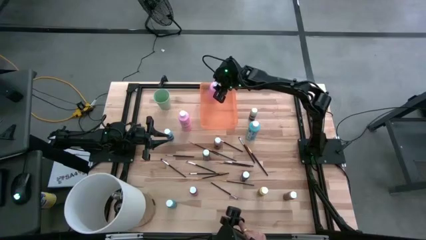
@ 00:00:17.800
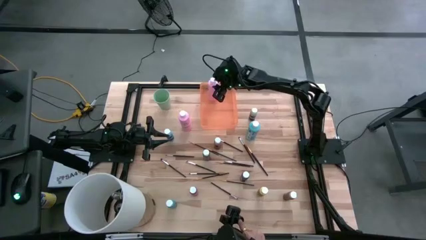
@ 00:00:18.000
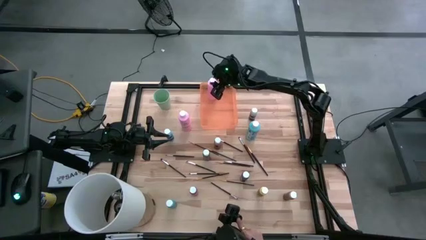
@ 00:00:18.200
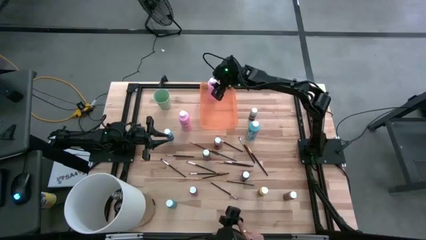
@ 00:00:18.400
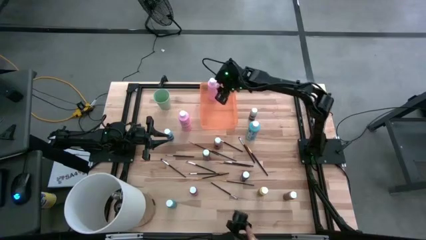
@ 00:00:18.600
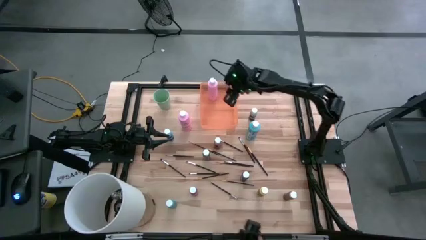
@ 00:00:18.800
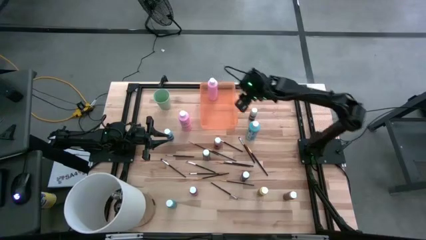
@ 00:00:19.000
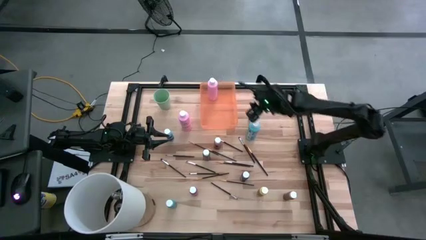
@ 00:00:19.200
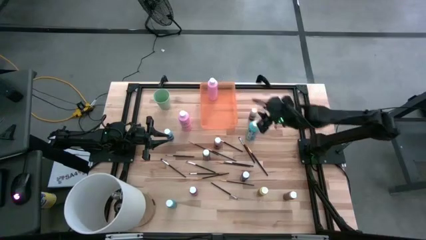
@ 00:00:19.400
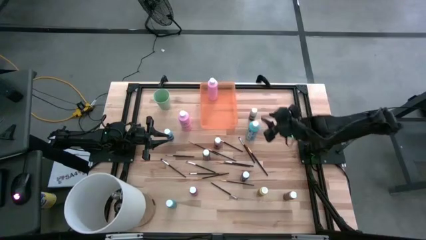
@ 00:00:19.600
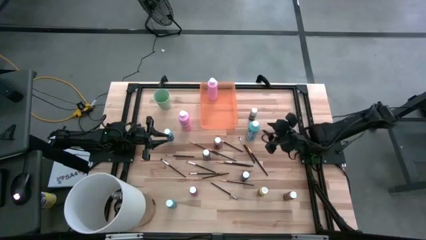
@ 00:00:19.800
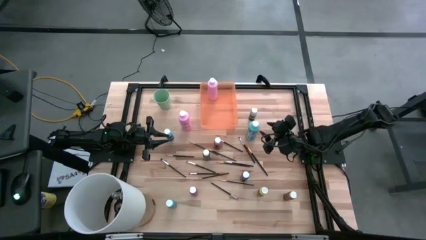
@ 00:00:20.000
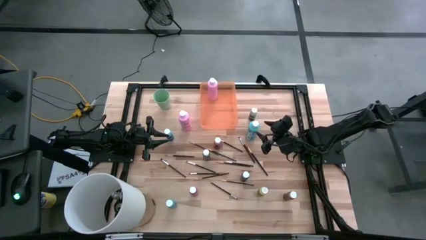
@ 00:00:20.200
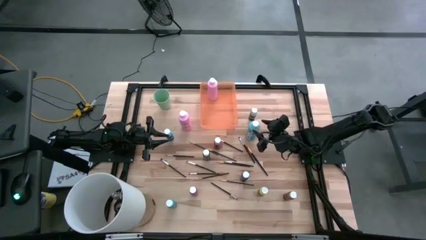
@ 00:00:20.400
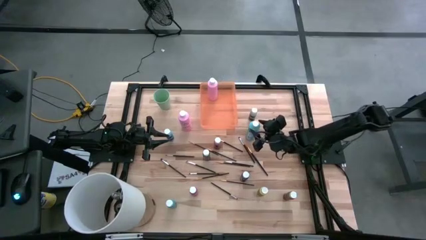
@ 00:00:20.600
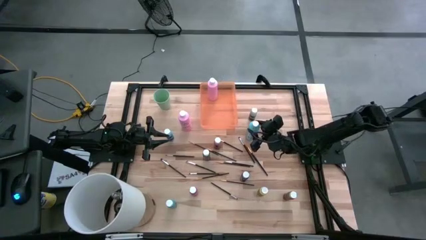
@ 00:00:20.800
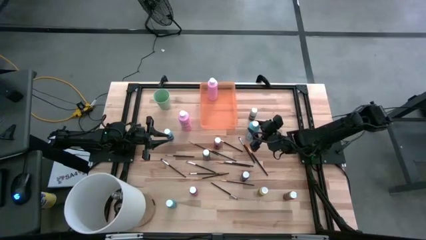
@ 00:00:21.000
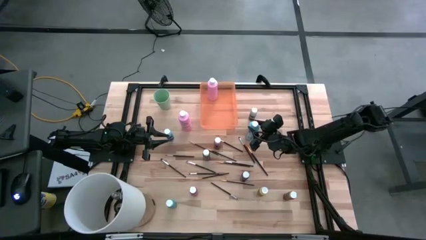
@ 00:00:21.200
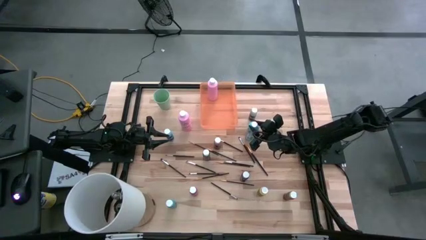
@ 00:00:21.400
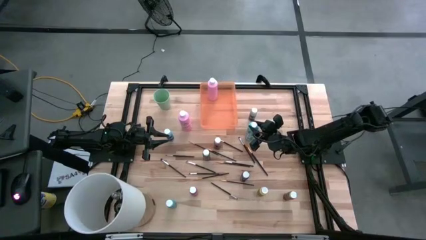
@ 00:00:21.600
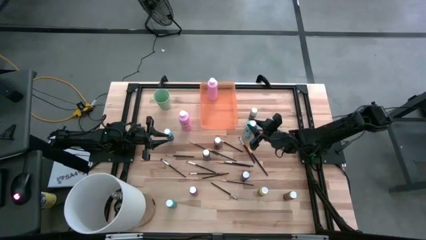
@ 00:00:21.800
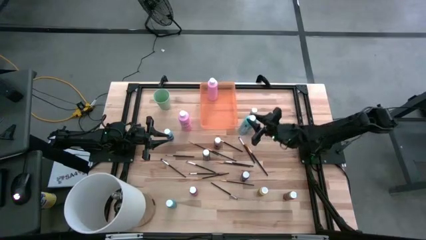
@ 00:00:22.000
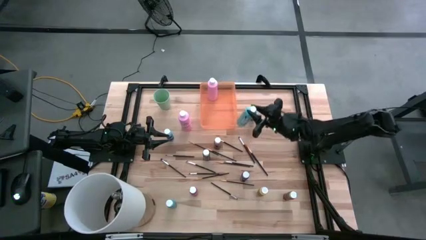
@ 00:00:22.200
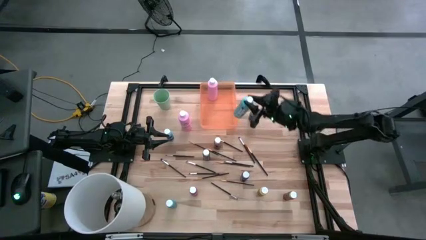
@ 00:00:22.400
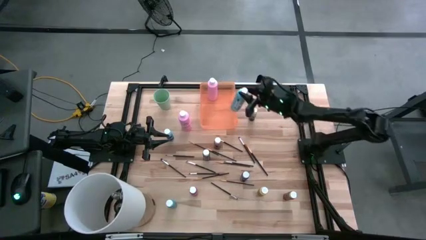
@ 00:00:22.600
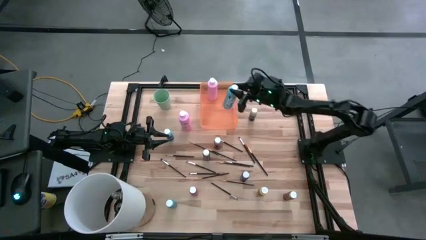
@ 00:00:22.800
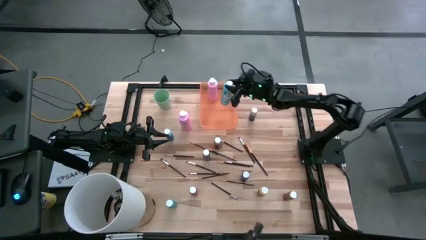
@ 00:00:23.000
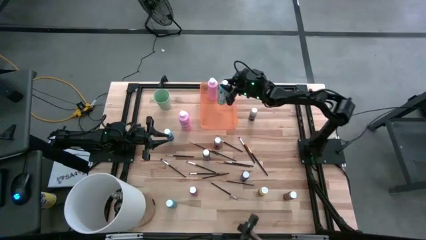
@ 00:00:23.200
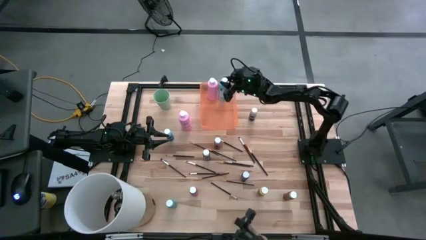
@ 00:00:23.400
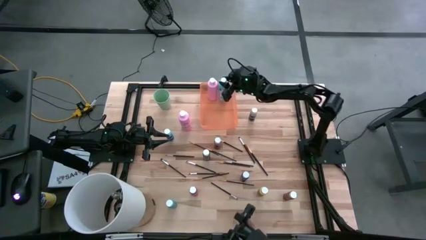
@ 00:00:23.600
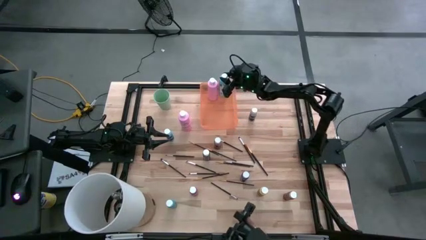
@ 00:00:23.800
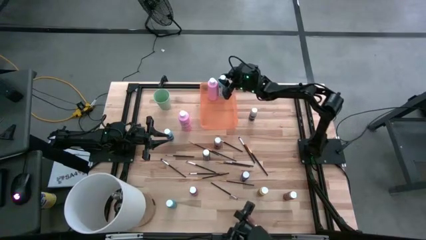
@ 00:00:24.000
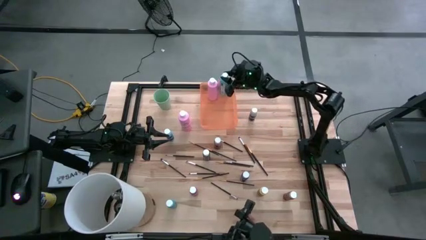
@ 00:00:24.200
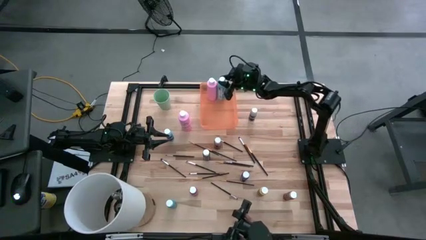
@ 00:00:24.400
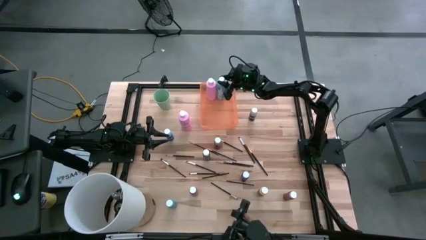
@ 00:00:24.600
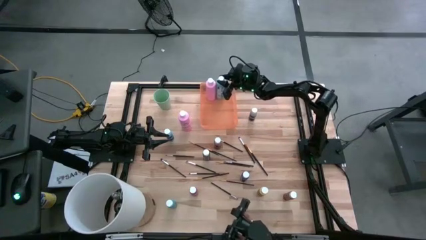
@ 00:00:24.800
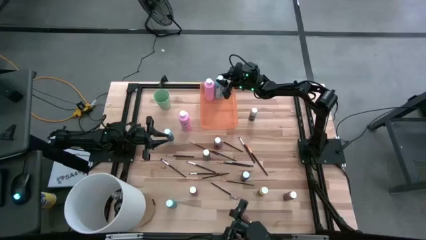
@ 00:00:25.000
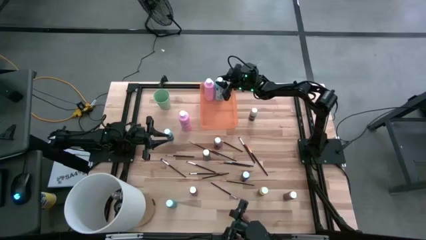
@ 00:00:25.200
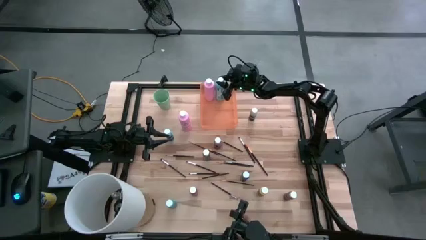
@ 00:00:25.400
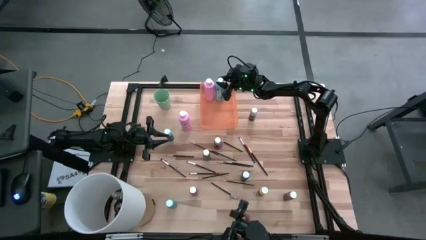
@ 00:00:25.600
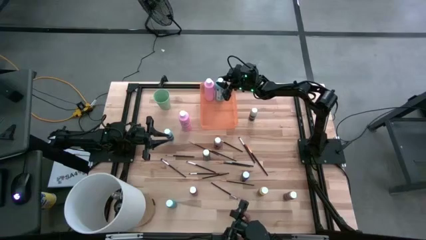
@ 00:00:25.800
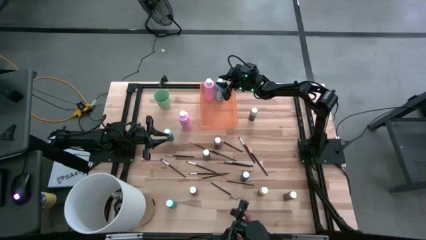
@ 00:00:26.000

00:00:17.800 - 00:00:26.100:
Task: Pick & Place Paint Supplies
Put the blue paint bottle into the orange bin

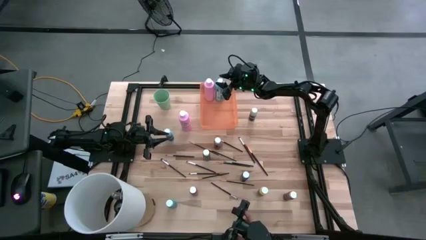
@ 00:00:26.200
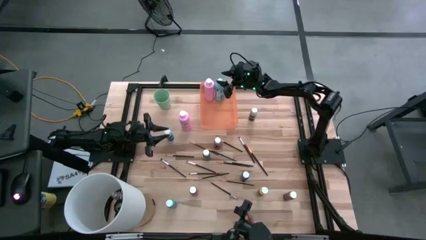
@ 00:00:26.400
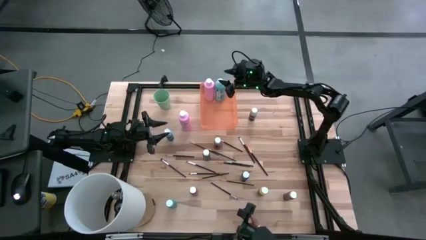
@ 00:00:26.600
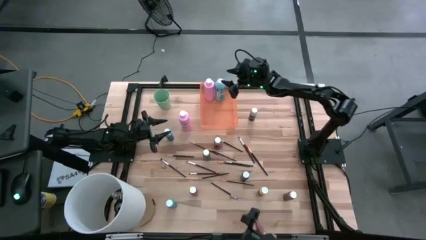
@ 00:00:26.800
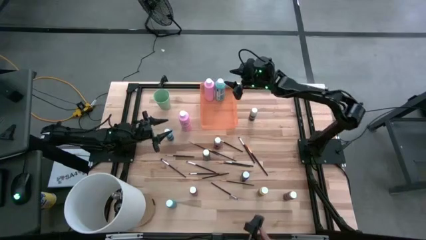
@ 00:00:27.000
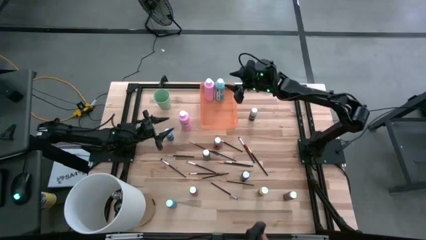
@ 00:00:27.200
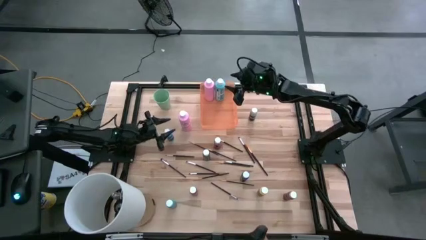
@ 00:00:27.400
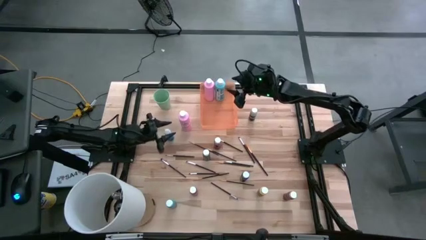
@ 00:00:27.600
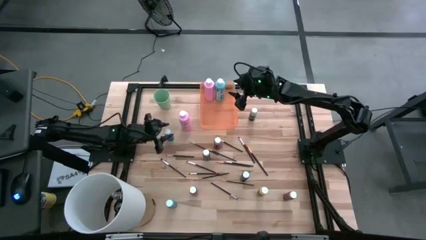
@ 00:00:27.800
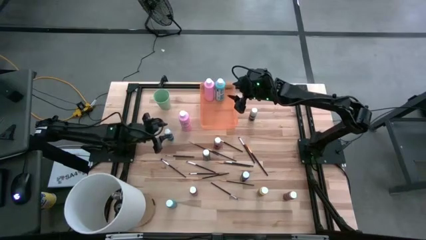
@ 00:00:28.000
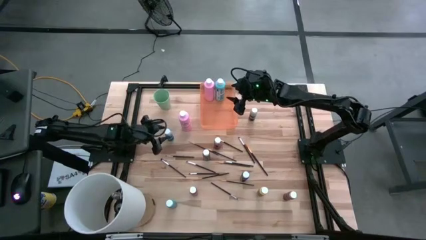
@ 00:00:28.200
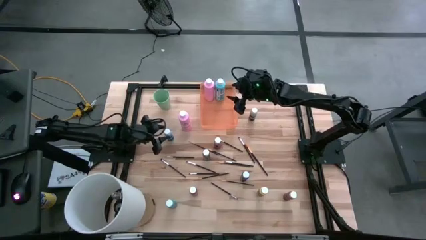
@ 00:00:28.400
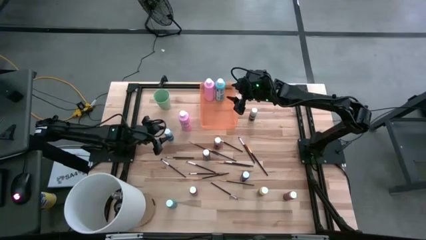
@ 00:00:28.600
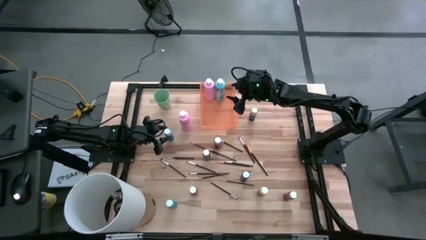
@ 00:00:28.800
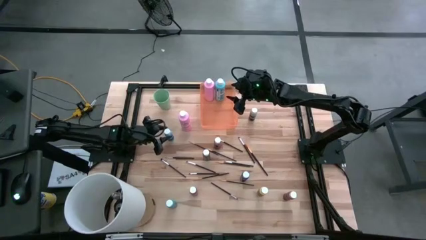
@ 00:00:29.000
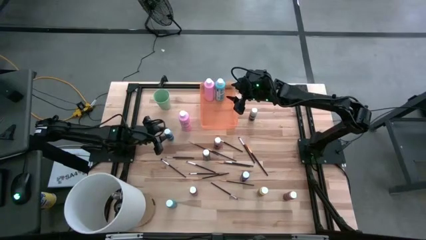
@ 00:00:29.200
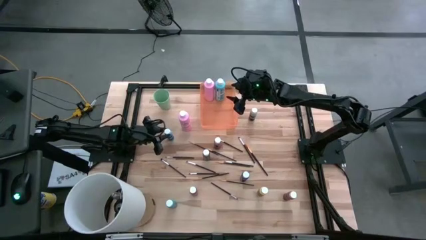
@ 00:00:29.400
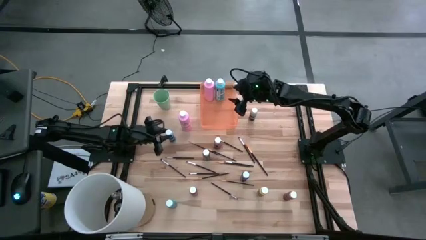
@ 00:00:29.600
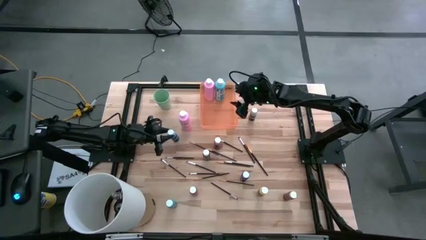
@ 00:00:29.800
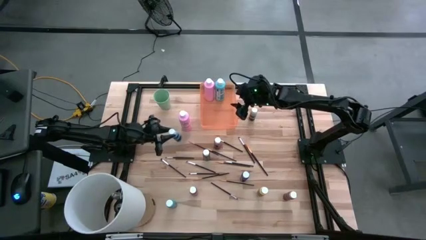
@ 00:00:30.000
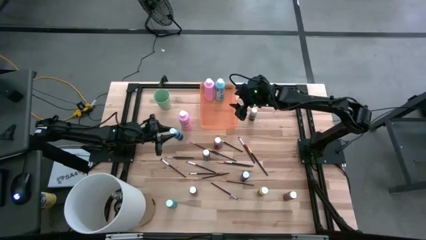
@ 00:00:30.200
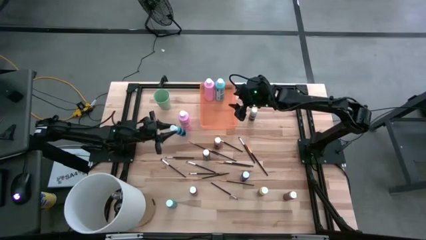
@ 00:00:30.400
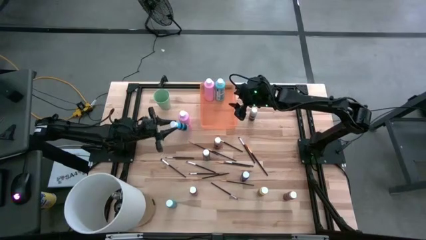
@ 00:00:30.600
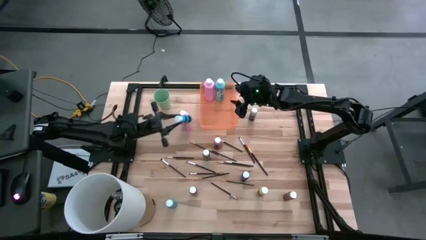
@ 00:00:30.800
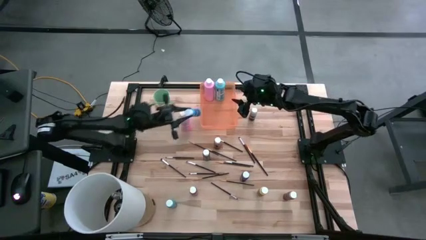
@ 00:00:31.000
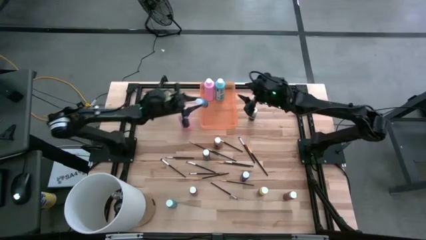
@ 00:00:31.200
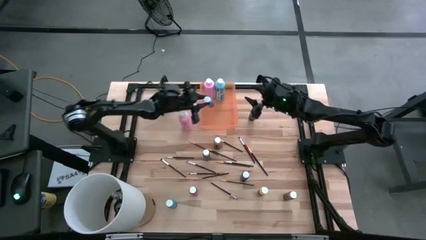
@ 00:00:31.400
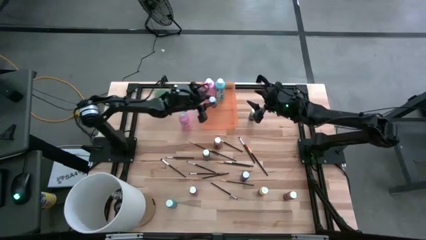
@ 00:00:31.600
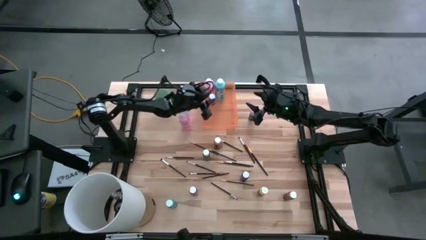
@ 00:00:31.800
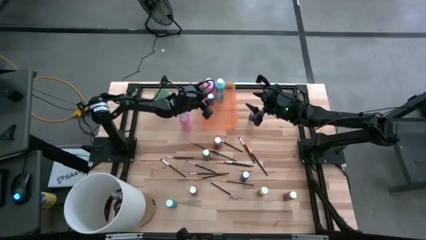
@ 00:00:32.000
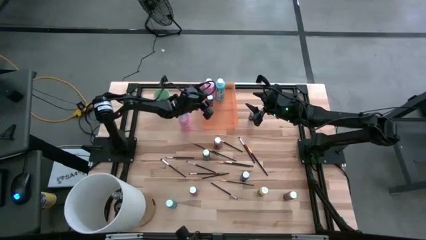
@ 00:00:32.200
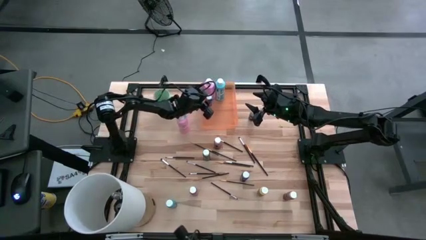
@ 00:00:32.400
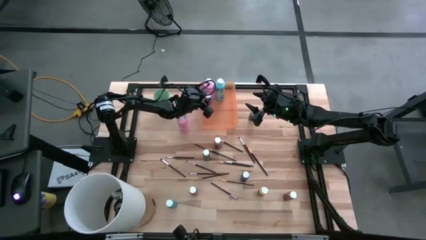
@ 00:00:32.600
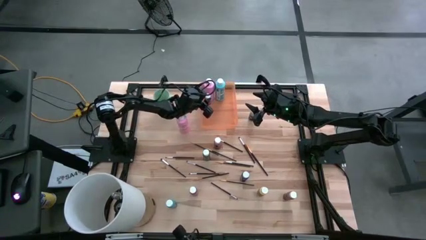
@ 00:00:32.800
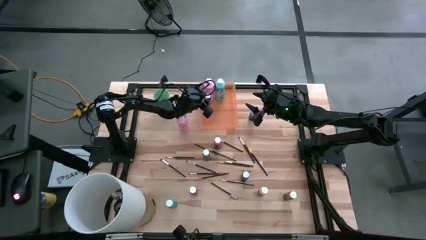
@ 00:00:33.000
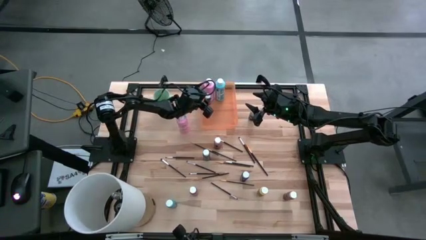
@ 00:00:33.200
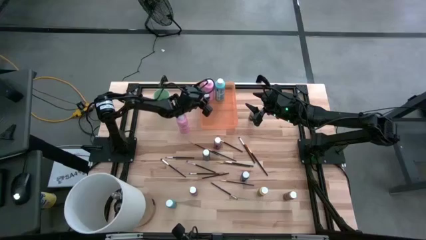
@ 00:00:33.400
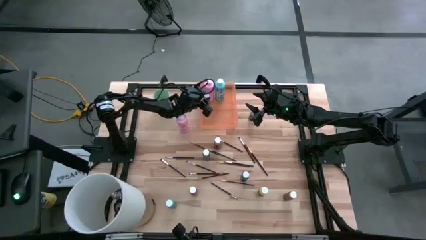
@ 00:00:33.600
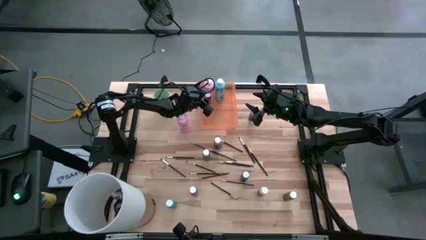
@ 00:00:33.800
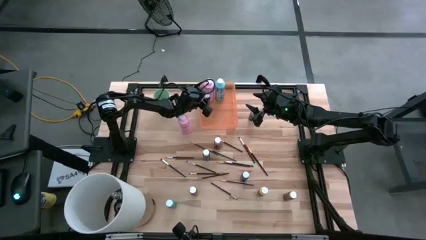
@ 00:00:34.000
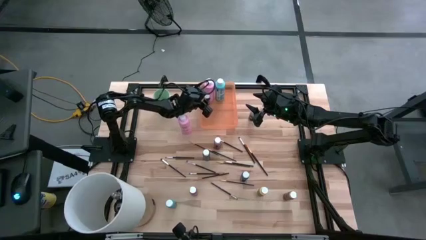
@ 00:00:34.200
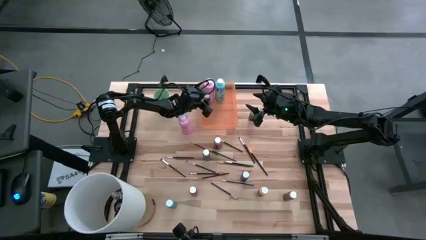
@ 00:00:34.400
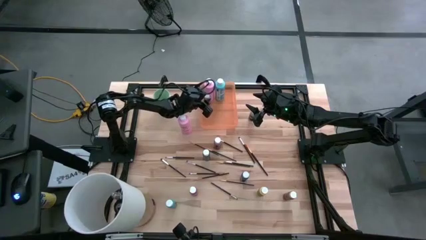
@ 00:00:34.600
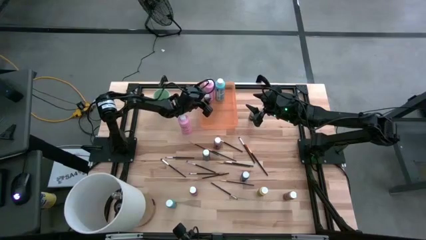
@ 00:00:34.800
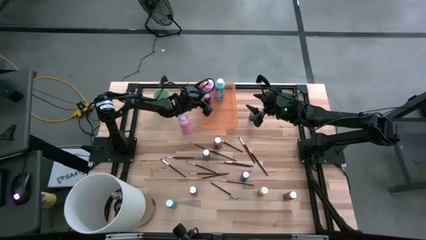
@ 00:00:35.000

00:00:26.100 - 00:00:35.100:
Put the blue paint bottle into the orange bin
